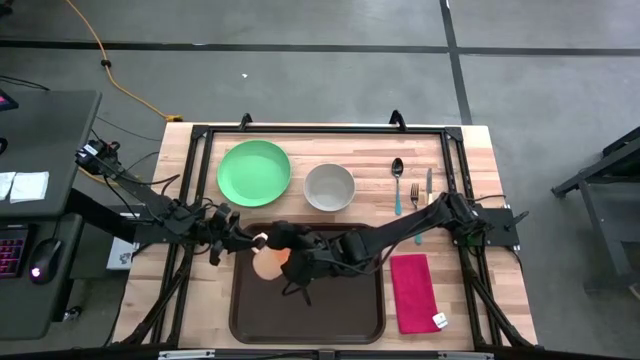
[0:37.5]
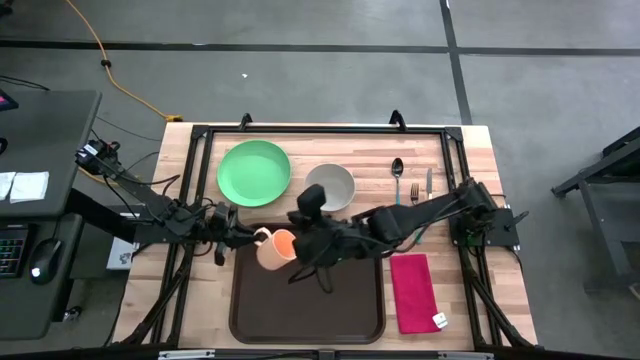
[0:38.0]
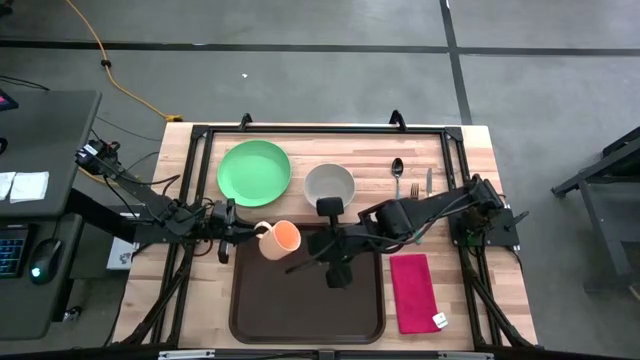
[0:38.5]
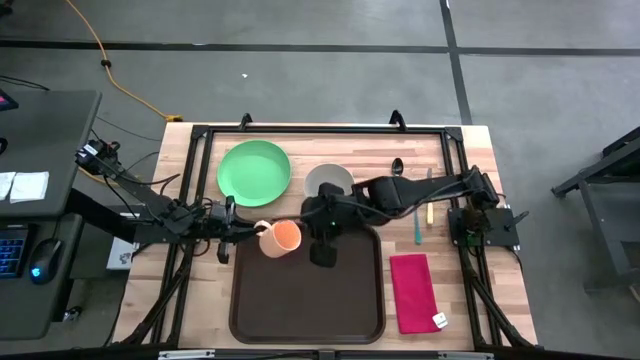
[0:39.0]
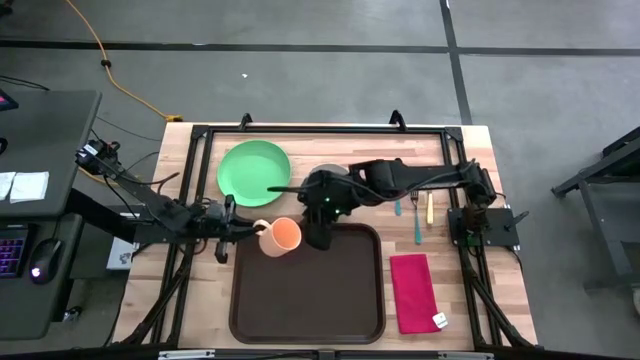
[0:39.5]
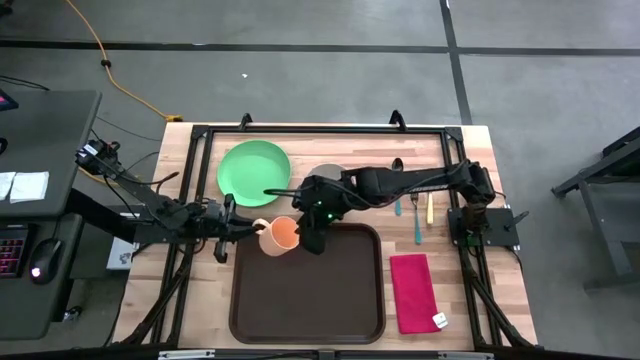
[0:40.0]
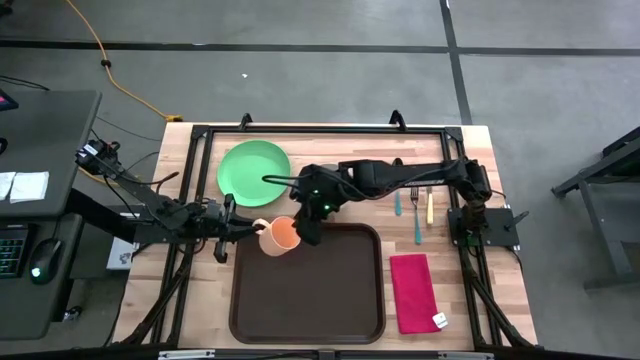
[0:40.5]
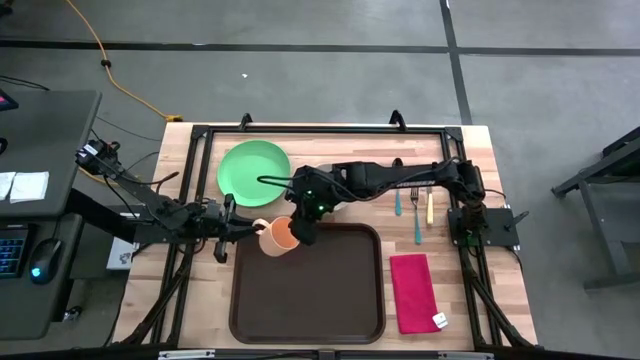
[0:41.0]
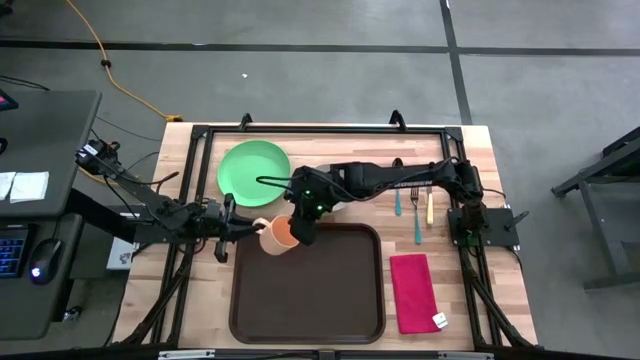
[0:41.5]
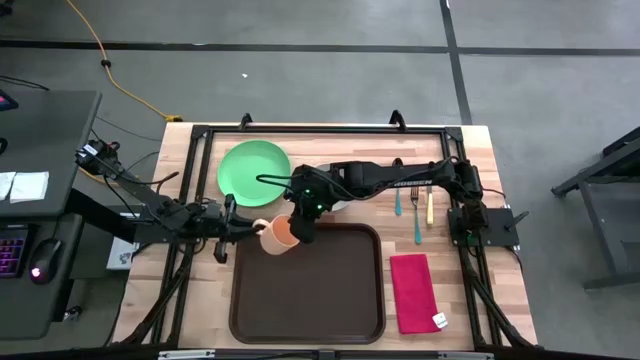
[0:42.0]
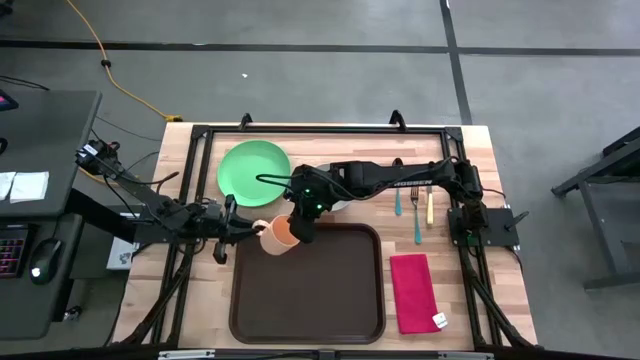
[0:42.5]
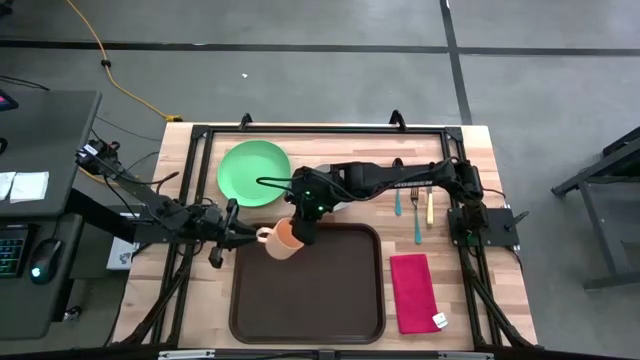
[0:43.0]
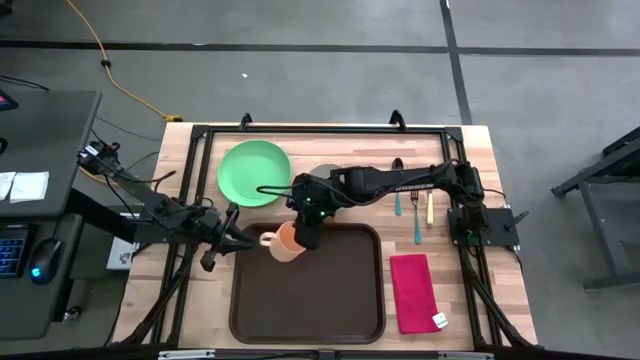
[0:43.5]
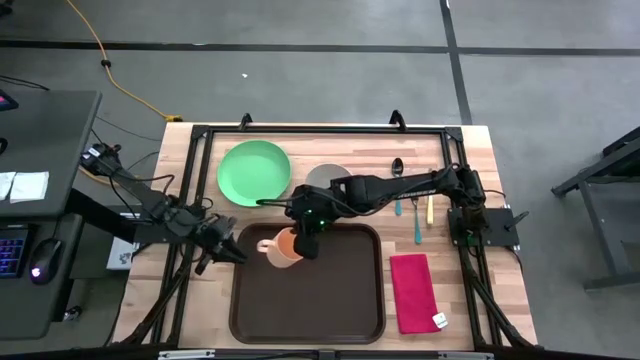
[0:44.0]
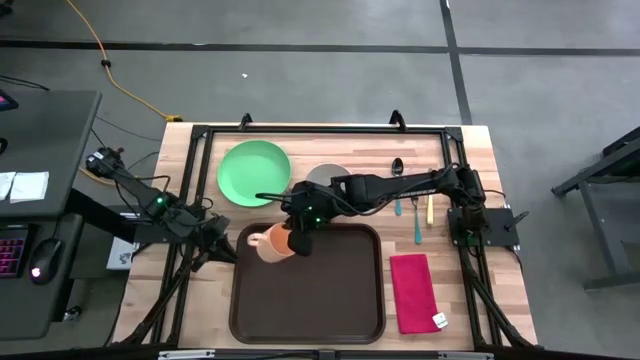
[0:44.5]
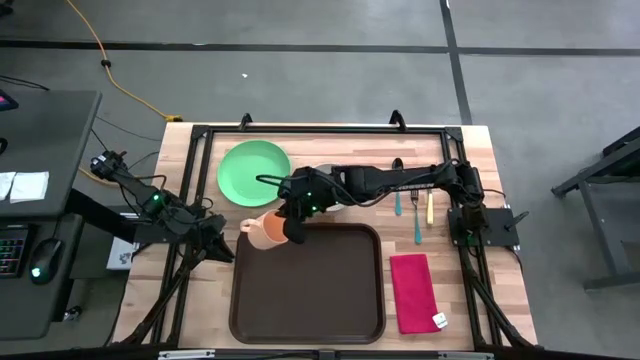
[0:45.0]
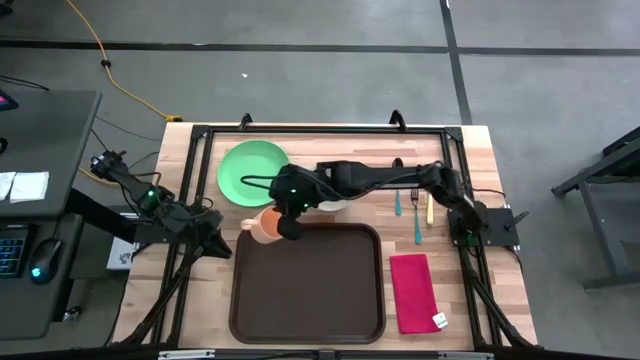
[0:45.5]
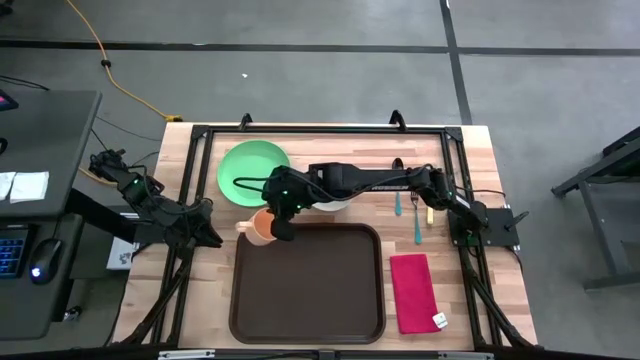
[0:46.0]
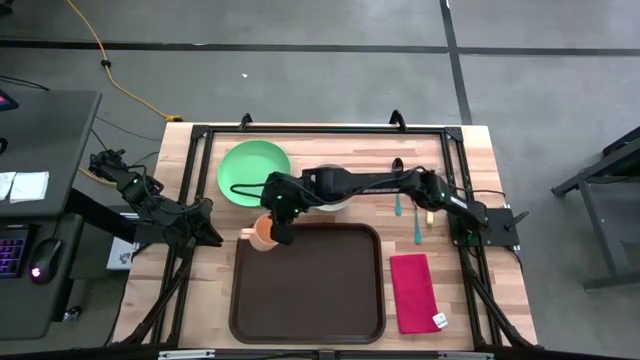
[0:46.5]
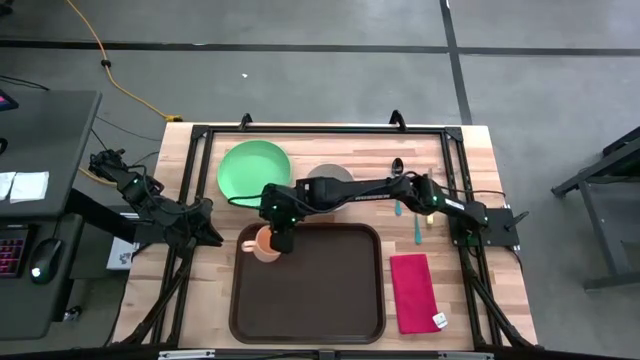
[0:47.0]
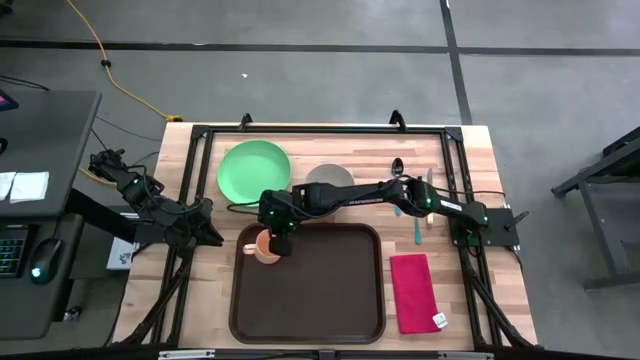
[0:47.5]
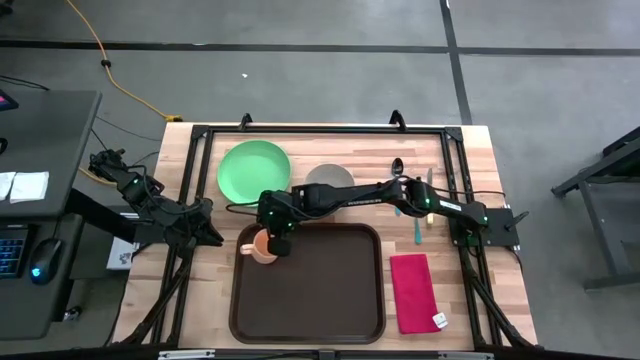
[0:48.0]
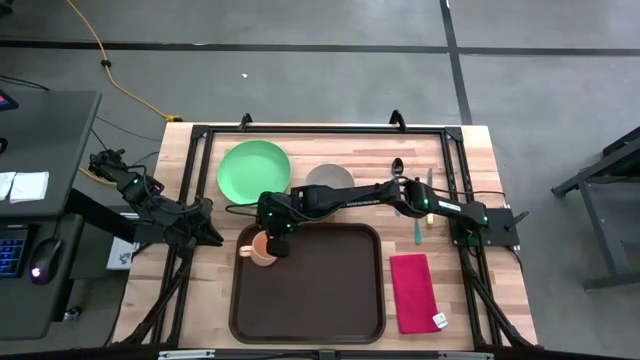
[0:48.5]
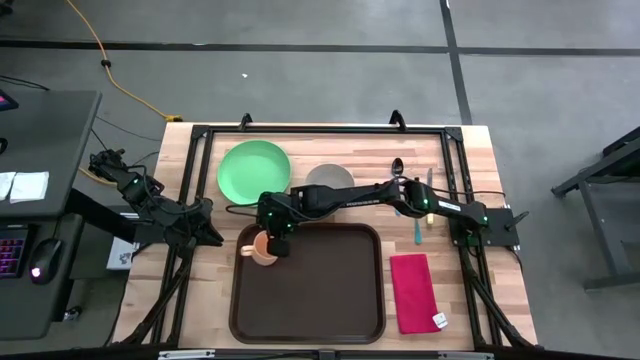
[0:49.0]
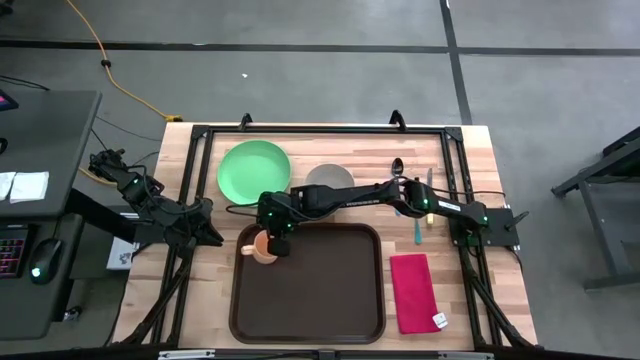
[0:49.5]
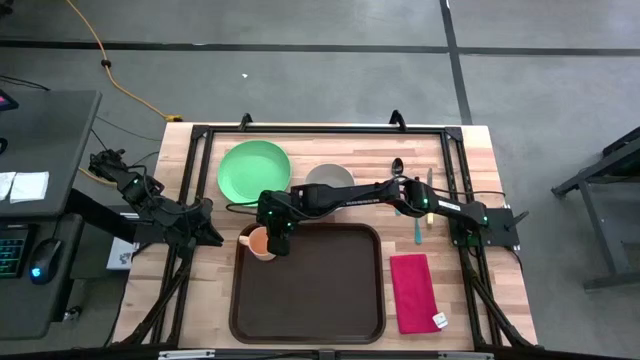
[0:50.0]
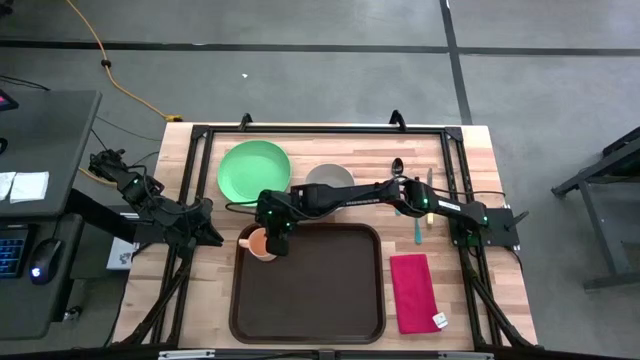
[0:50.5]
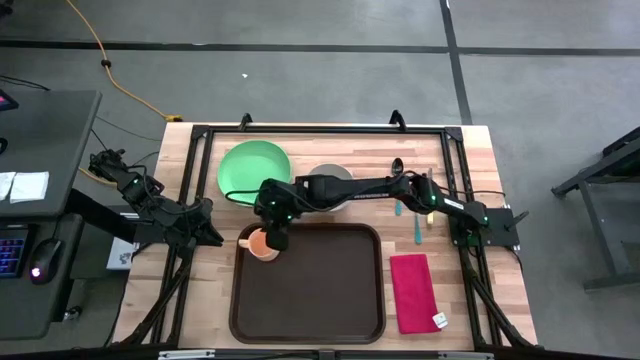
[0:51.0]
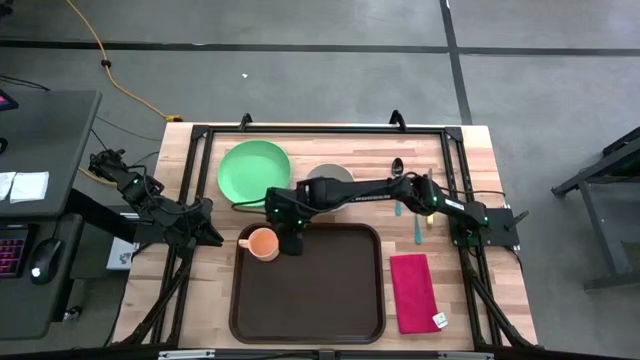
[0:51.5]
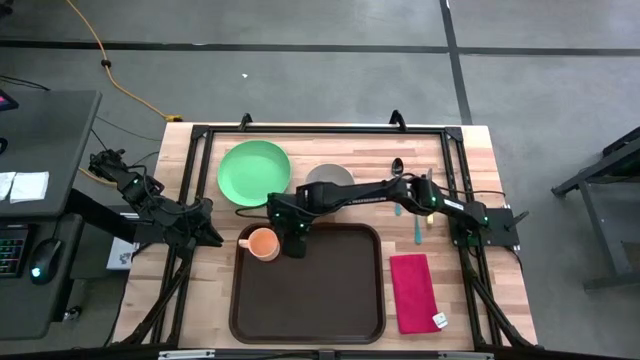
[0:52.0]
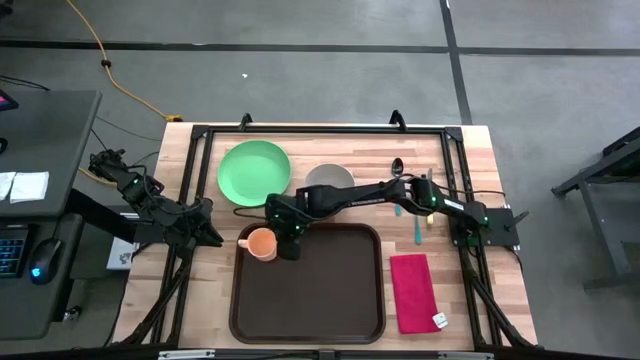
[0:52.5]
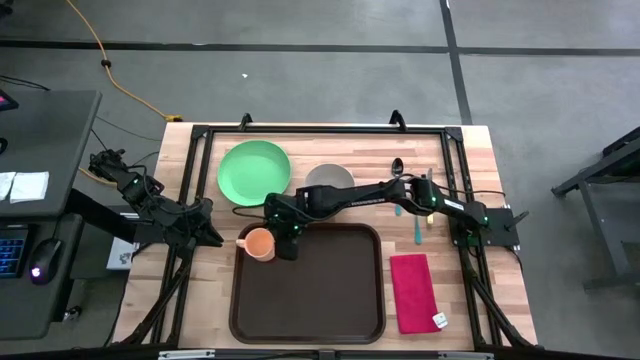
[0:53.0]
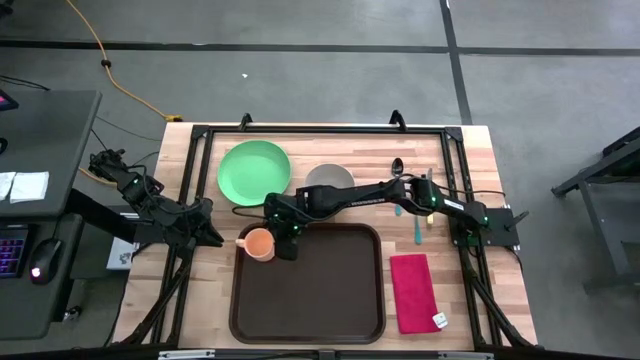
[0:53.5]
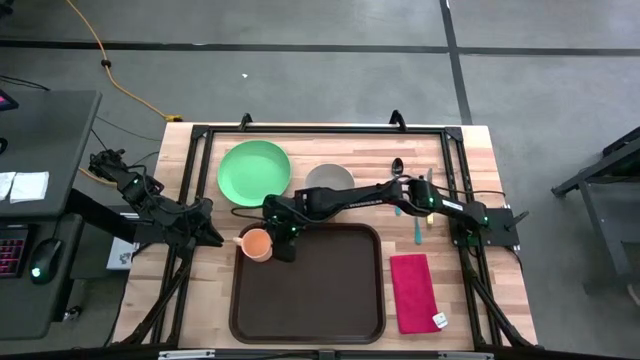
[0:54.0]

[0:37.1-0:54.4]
Task: Set up tray
Put the light orange mug on the top left of the brown tray

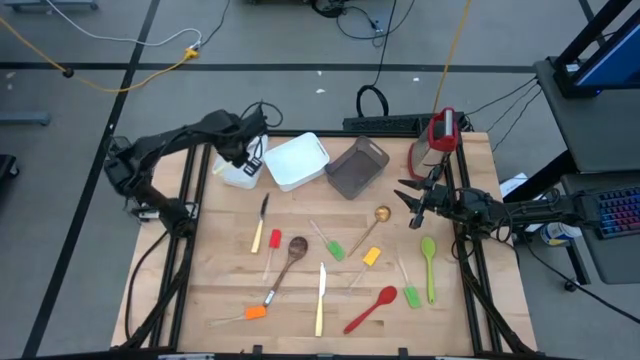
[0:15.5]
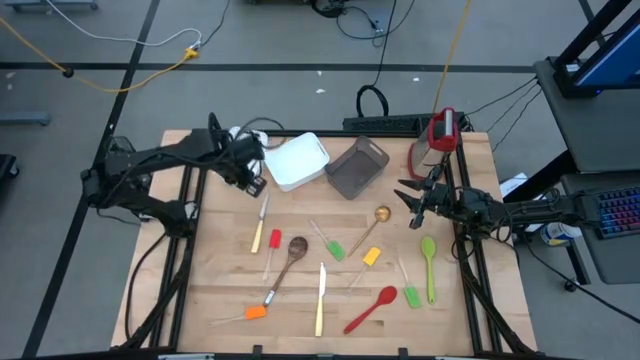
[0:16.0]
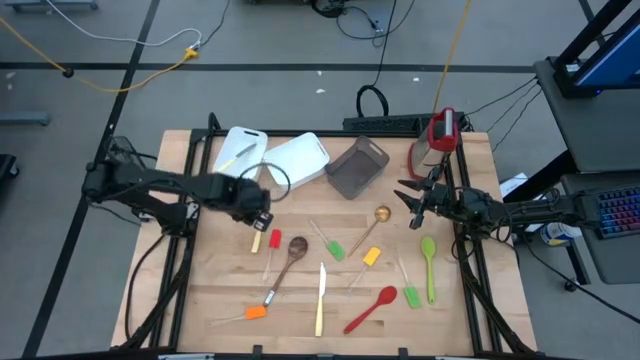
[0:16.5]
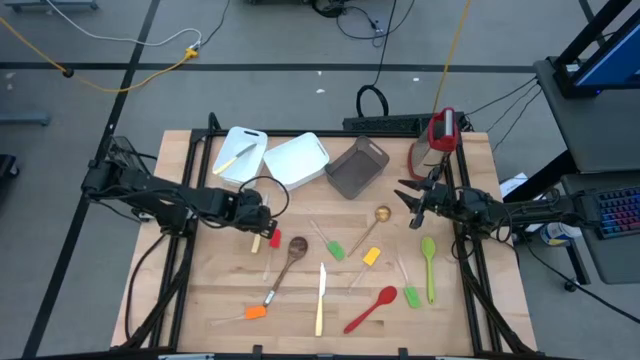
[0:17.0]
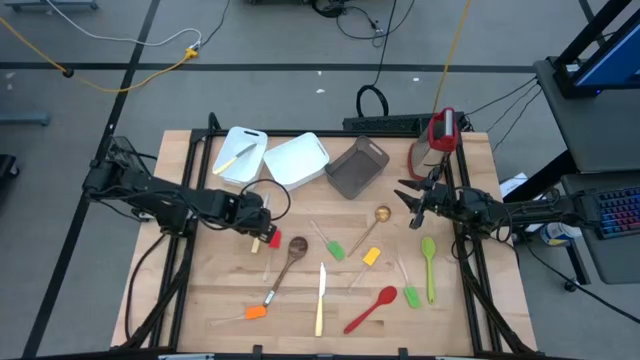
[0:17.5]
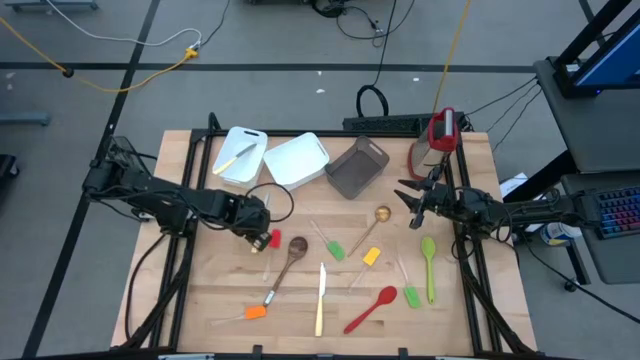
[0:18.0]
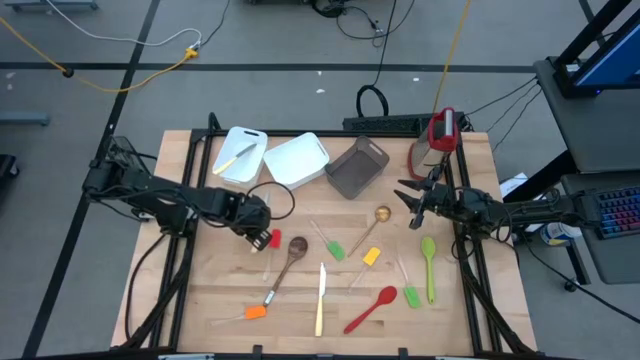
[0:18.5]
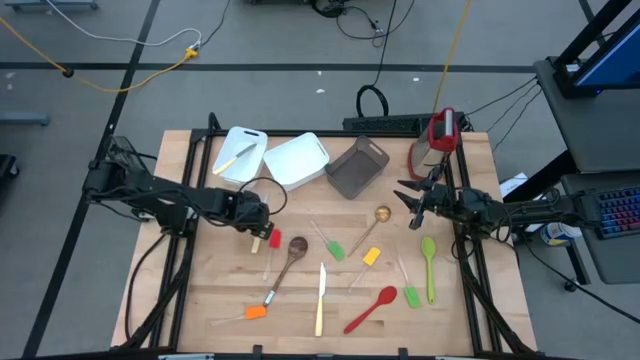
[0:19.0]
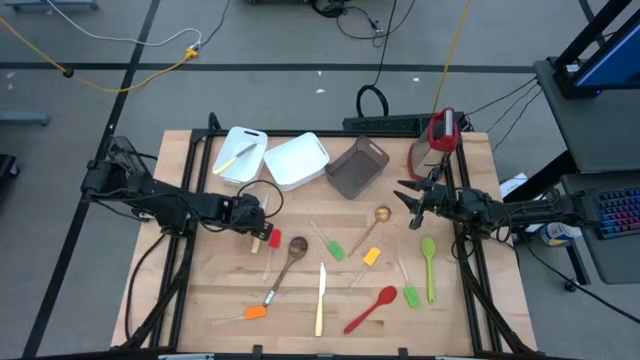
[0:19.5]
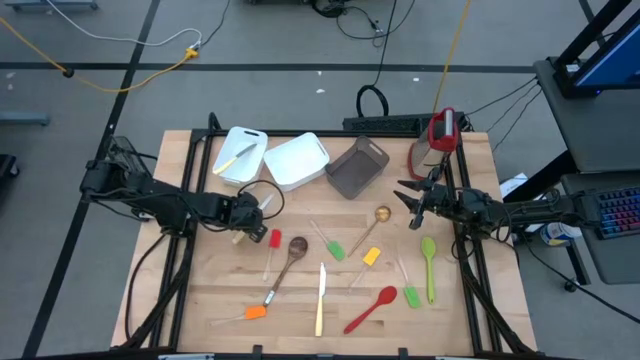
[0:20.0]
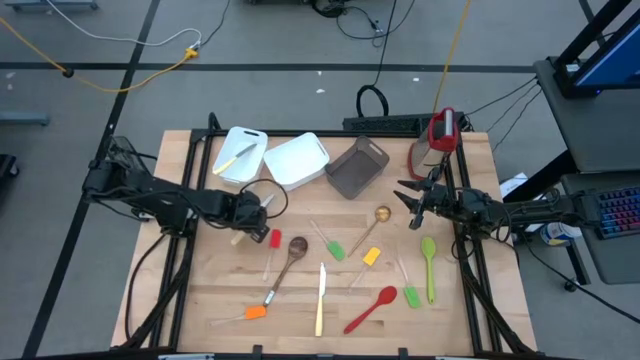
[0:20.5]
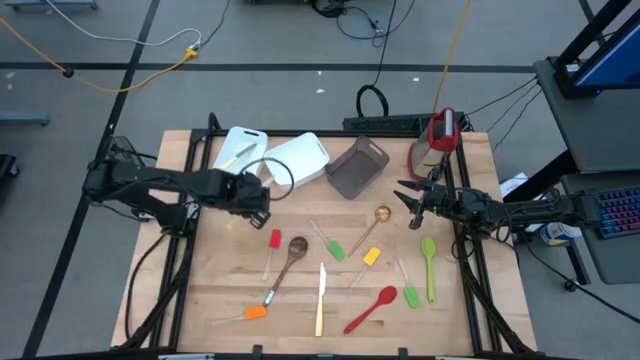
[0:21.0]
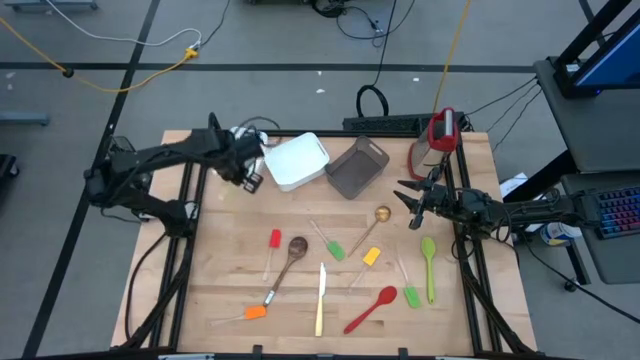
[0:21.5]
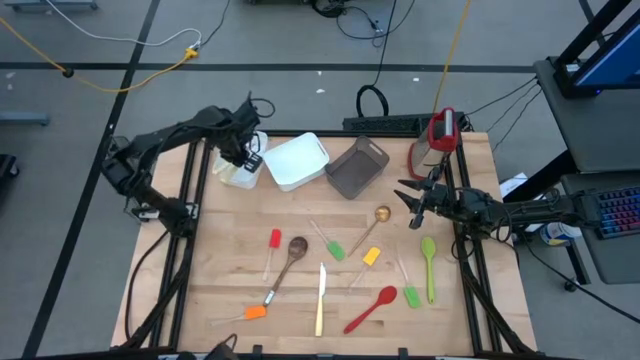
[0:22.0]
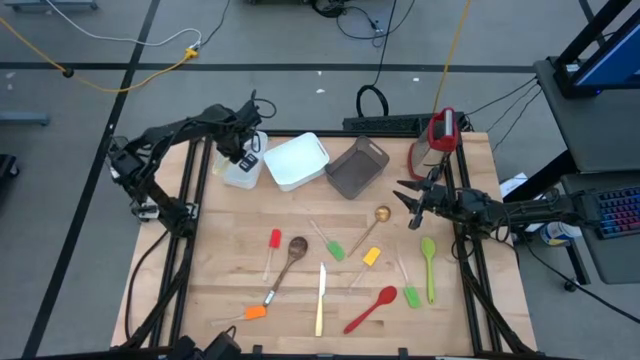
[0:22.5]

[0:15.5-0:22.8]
Task: Pick & Place Kitchen Items
Put the yellow kitchen knife into the left white bin
